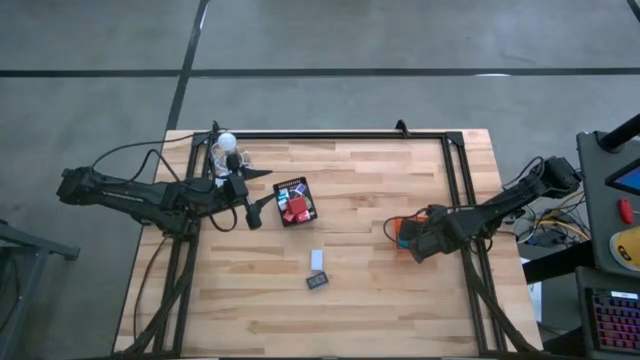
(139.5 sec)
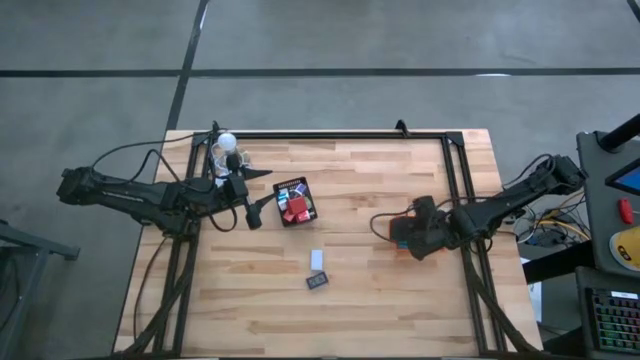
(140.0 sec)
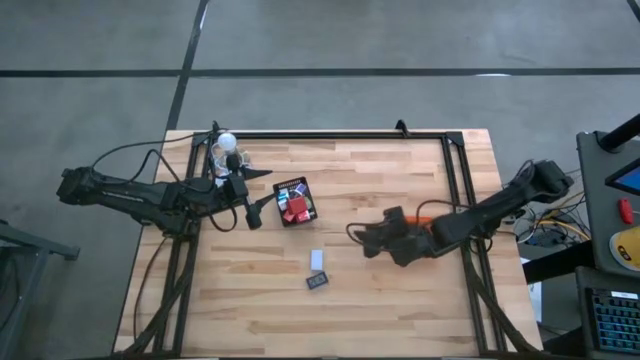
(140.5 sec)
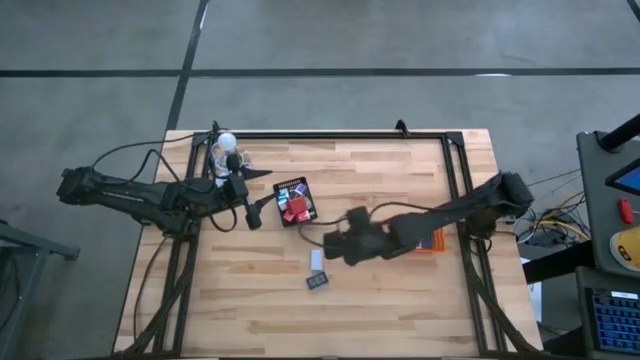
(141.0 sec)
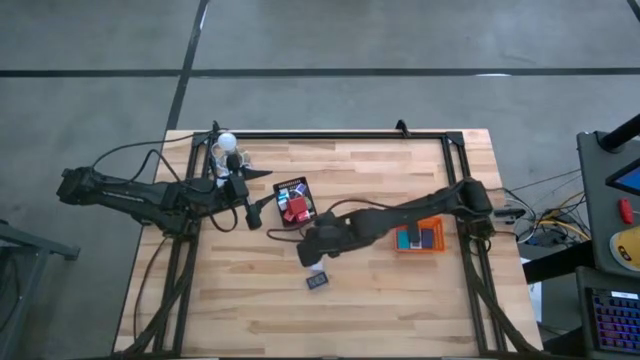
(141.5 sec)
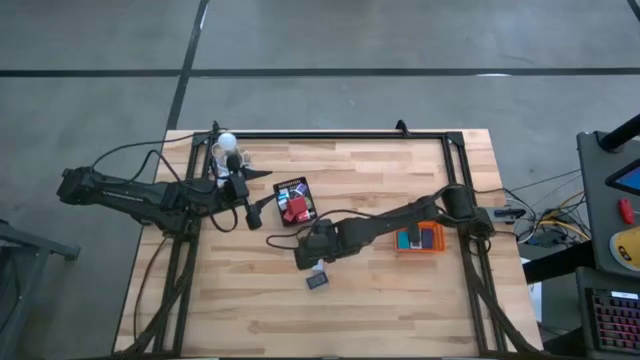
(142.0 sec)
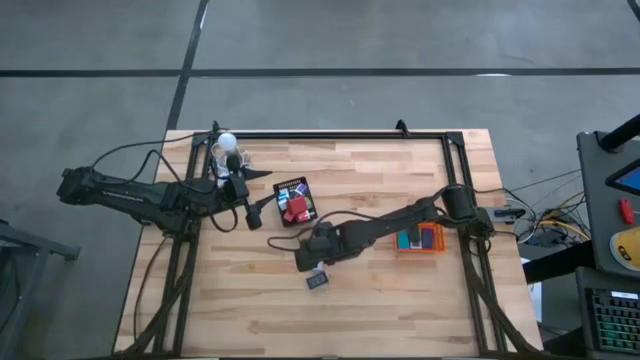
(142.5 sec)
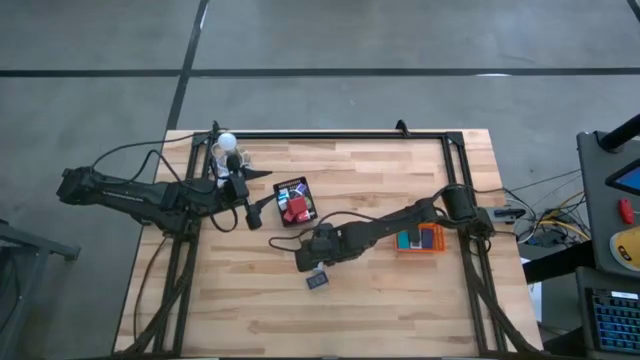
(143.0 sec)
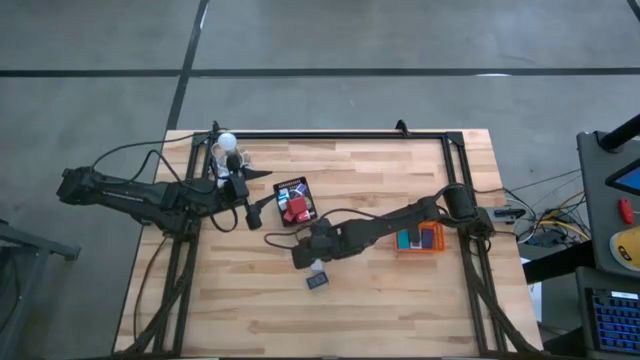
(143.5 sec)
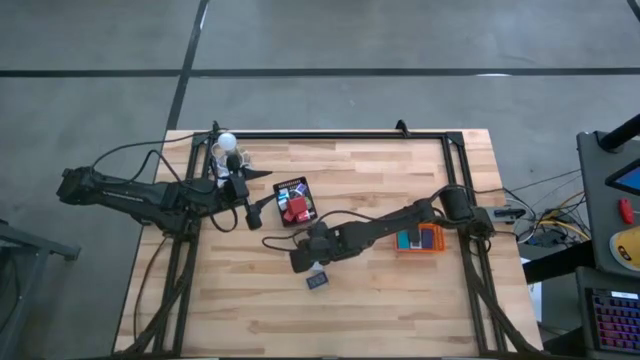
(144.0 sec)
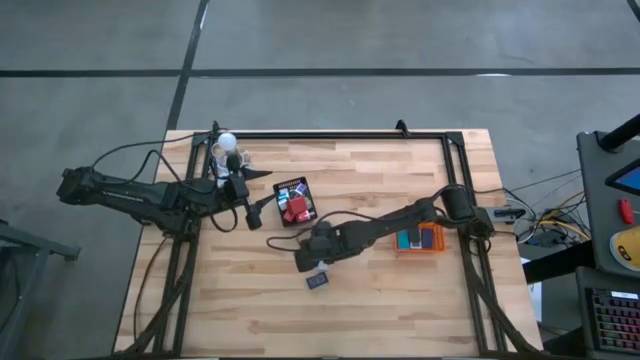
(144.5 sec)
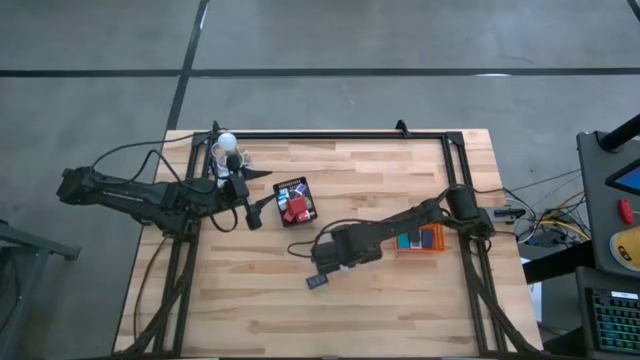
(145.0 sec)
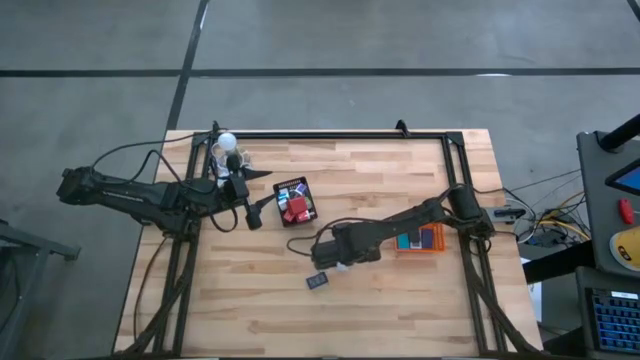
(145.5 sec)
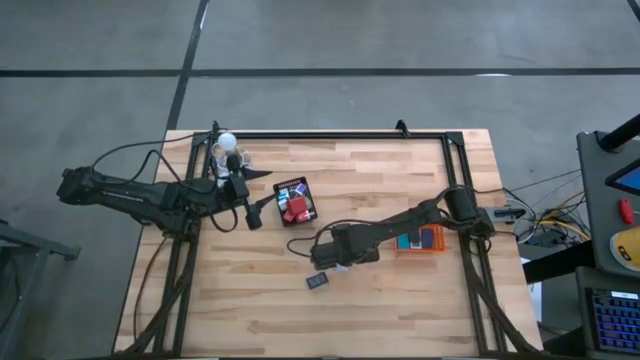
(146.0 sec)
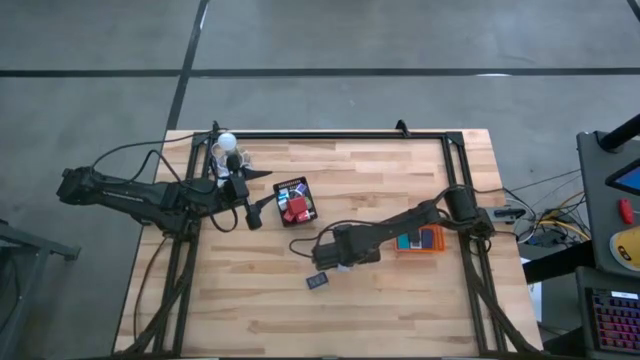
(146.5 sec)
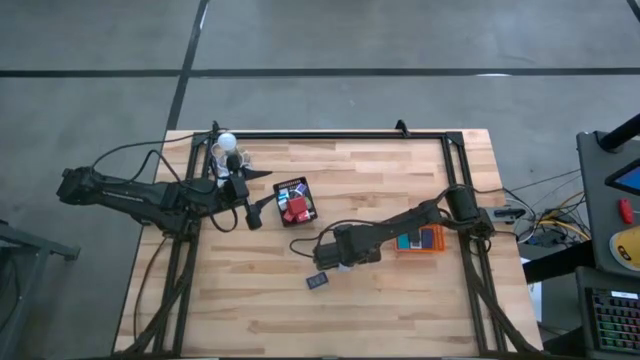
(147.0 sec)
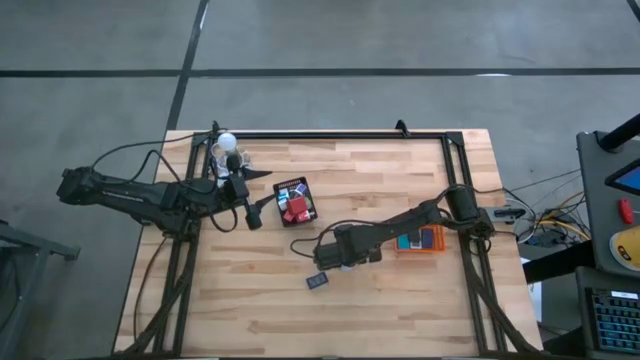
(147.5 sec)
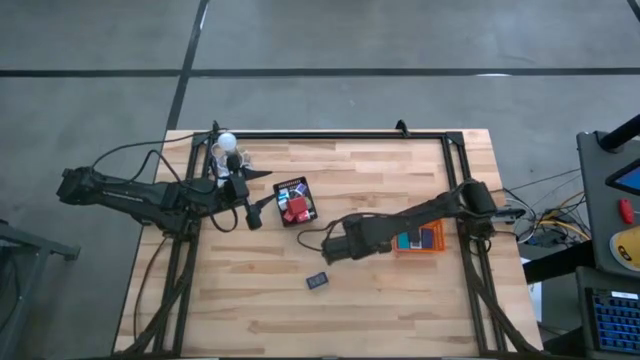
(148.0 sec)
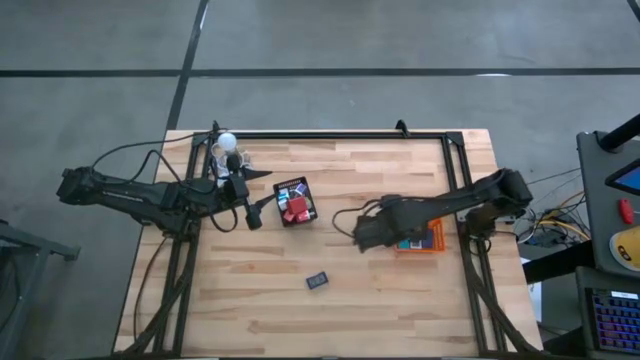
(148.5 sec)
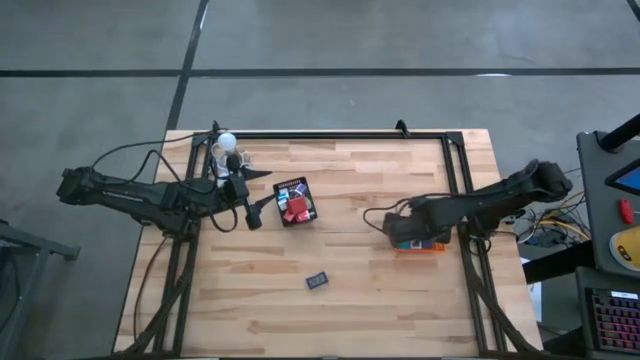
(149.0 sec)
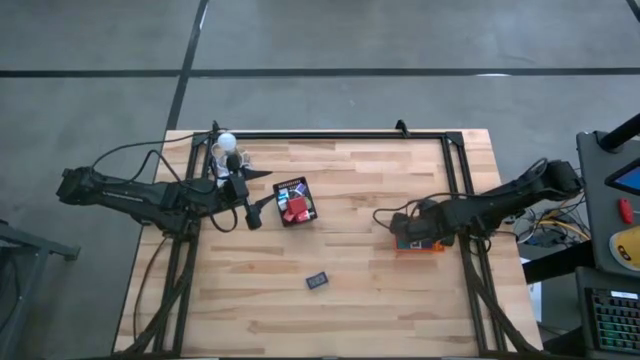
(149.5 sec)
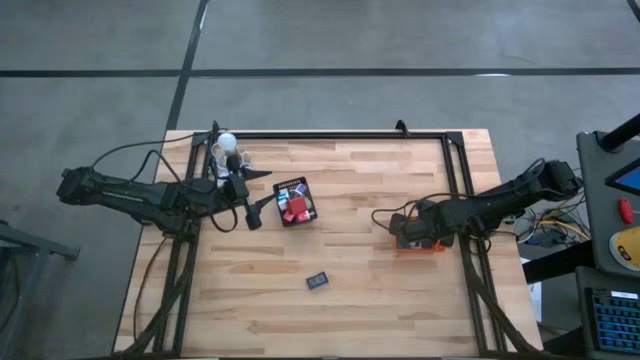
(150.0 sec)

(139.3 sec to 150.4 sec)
Task: Pick & Place Office items
Put the white digital clock in the orange bin

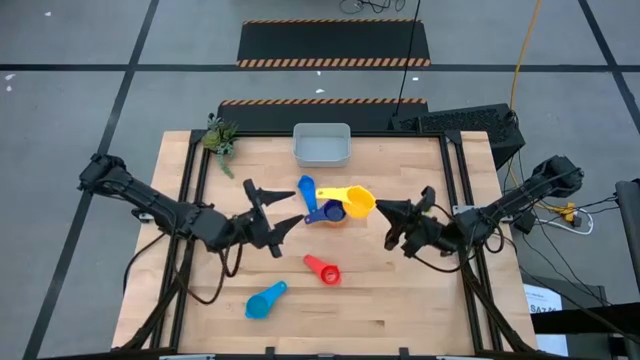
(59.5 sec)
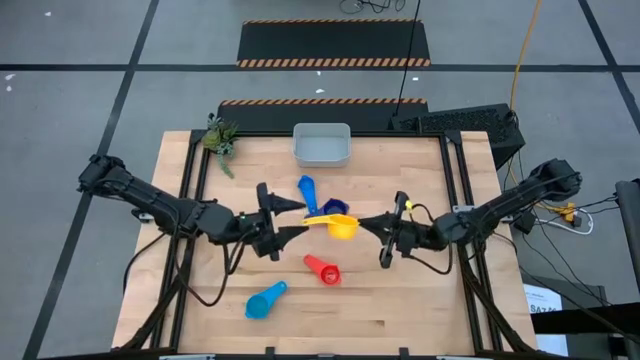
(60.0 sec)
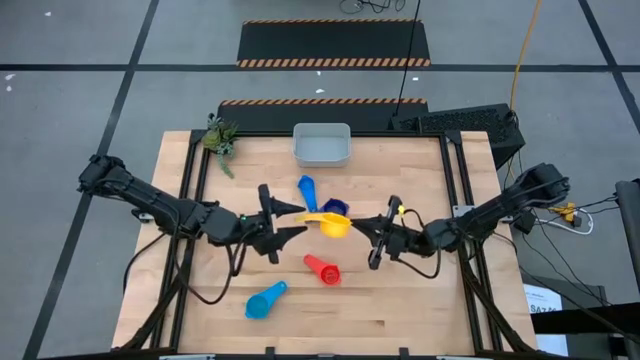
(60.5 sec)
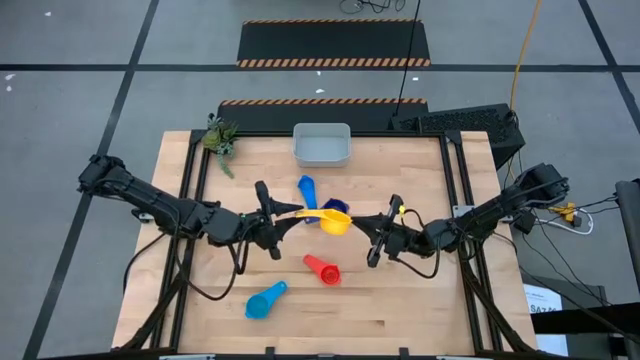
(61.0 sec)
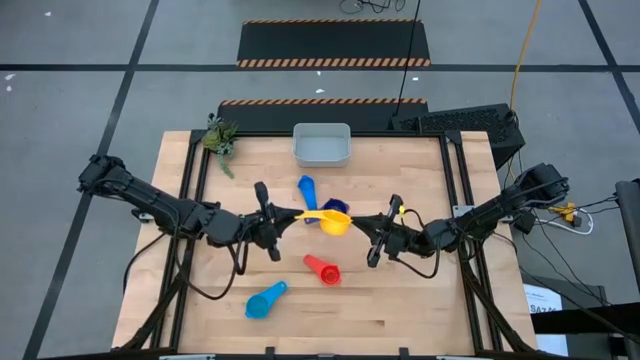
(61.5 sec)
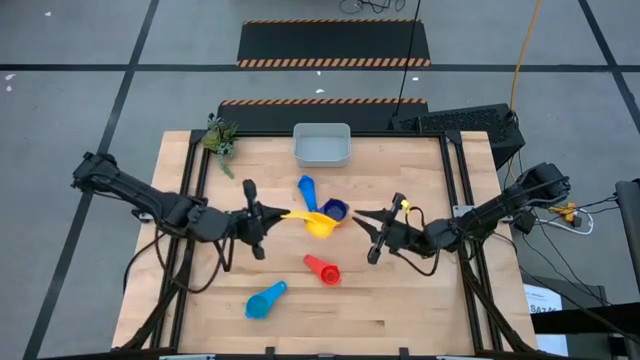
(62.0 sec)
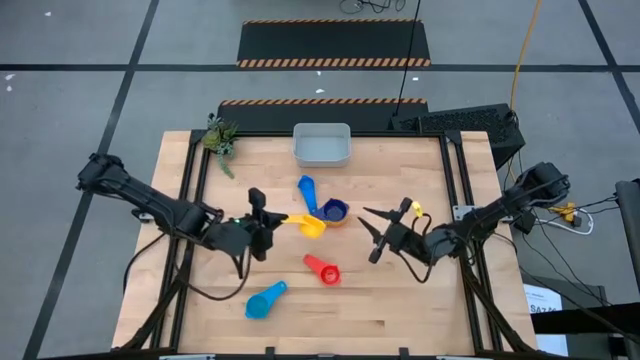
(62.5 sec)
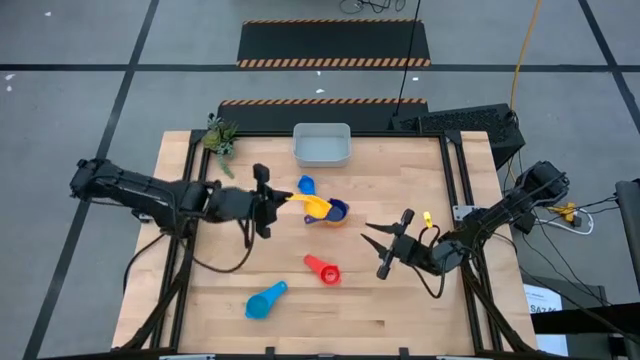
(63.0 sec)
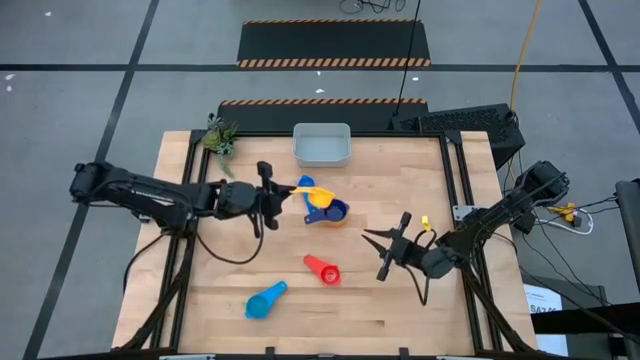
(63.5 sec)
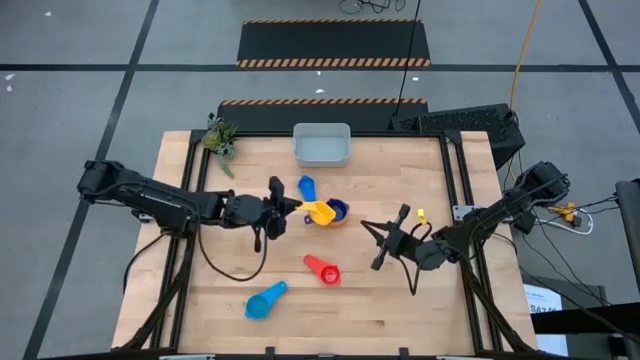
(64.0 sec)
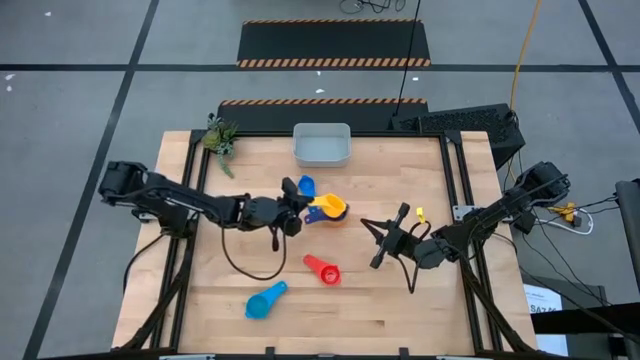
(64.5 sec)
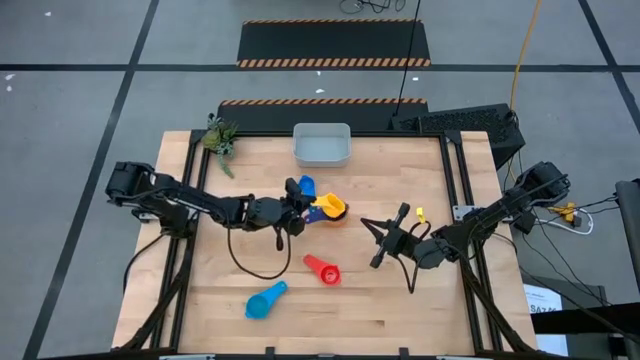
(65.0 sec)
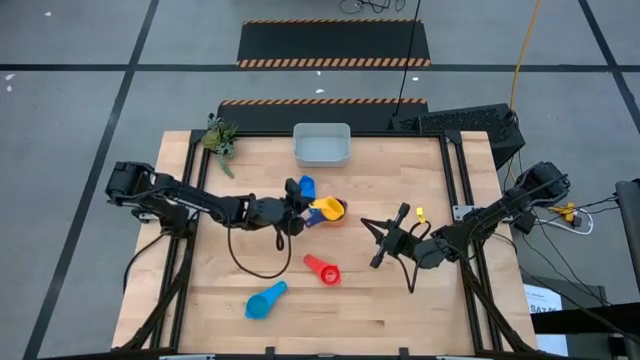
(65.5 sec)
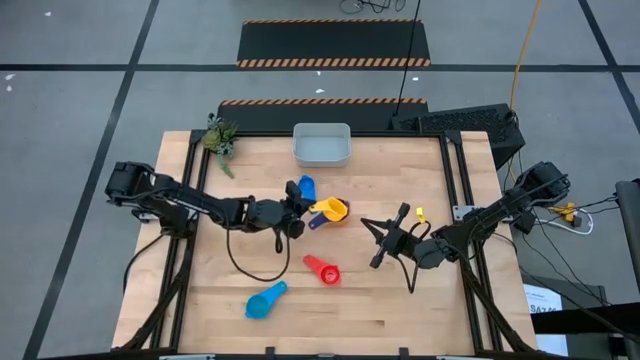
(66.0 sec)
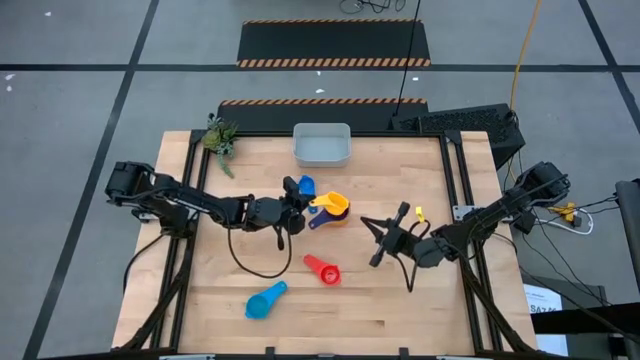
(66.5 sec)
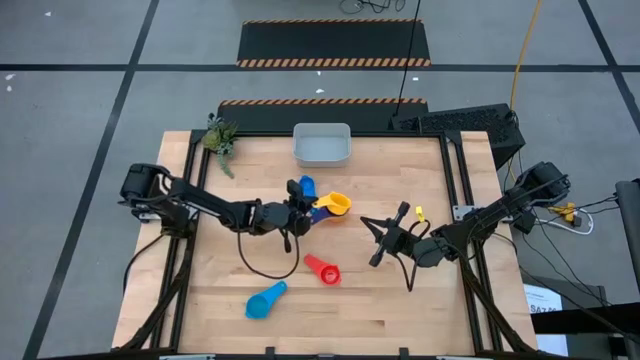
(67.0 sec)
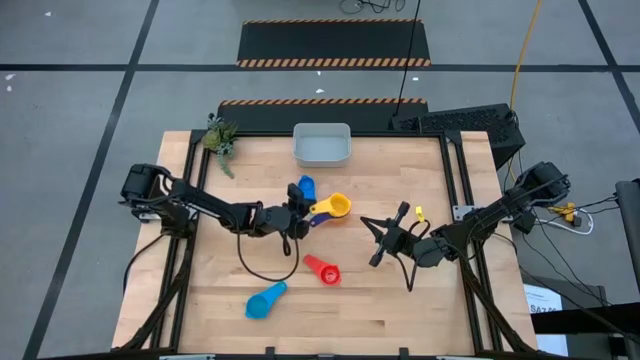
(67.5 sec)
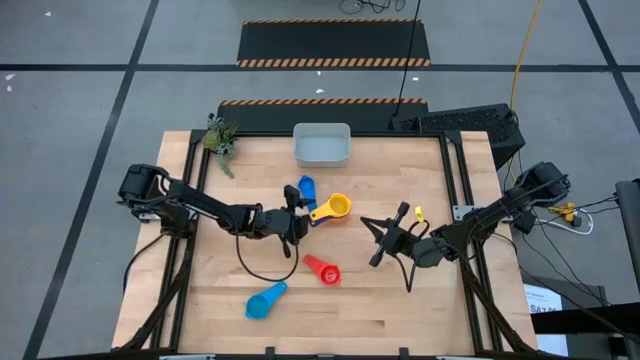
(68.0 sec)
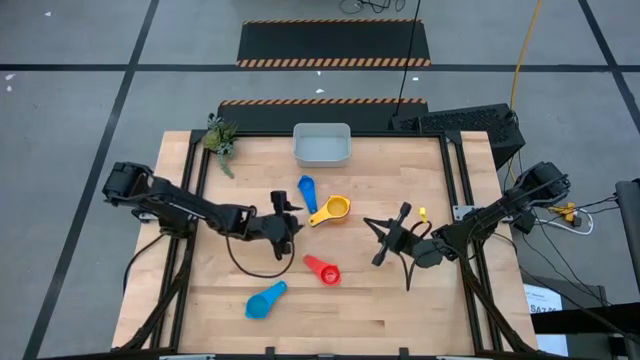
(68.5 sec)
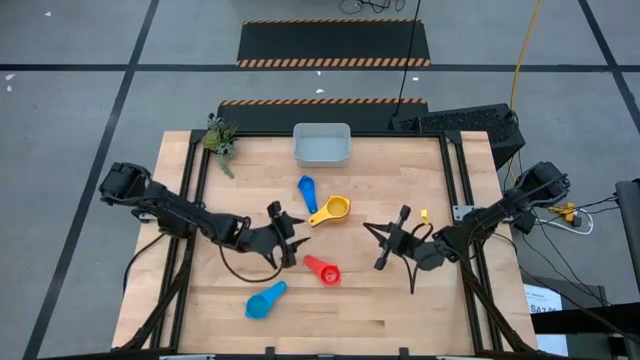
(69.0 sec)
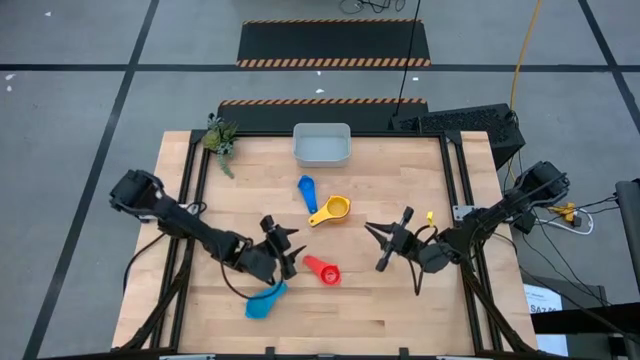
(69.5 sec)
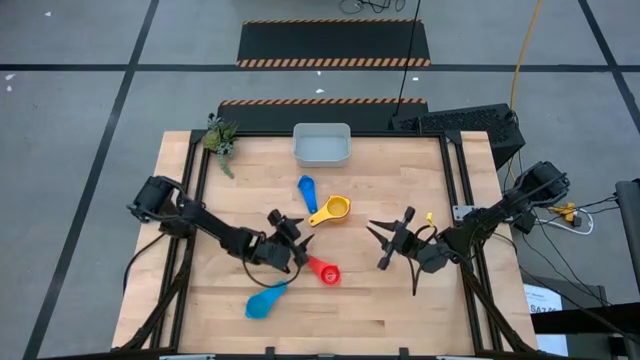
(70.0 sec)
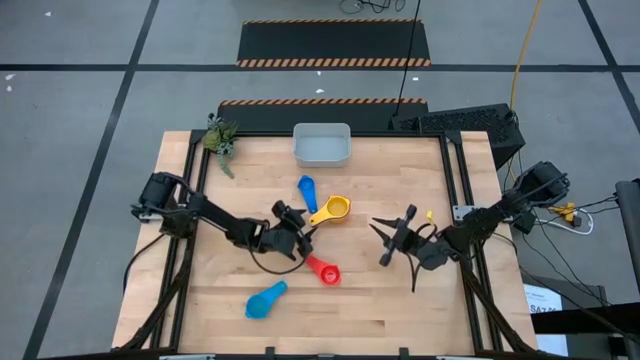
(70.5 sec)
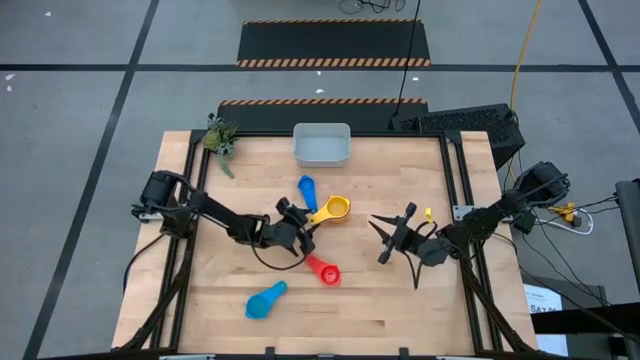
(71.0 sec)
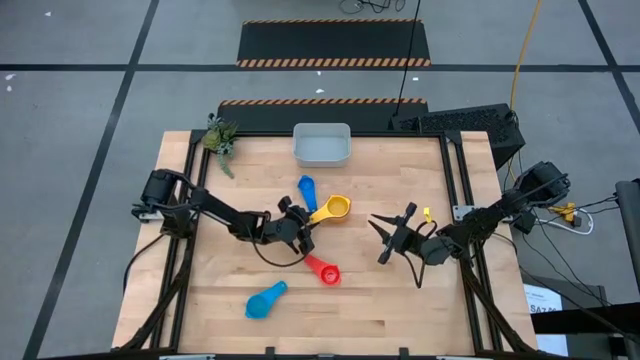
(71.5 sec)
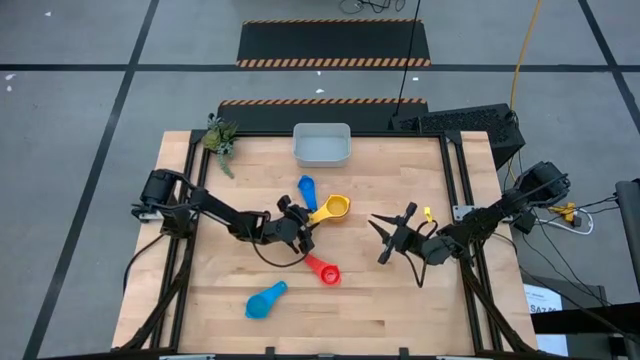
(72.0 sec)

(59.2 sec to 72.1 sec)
Task: Nest measuring cups in basket
Stack the yellow measuring cup into the purple measuring cup
